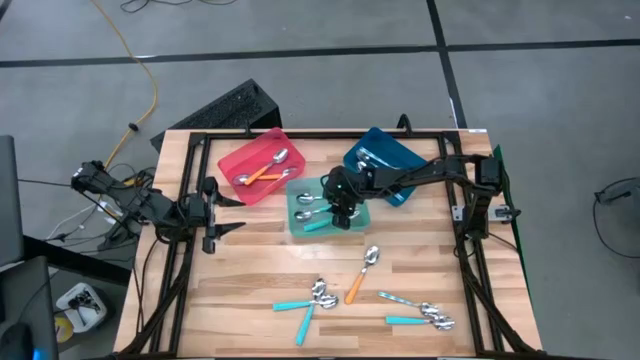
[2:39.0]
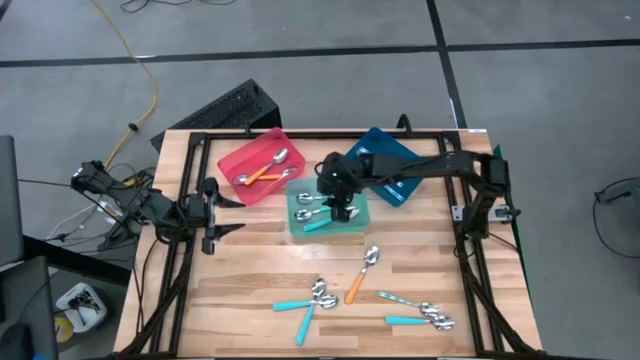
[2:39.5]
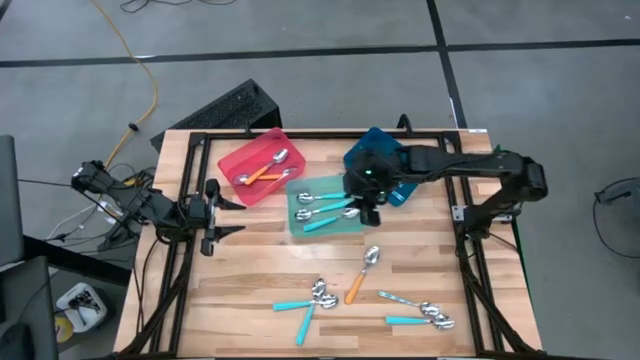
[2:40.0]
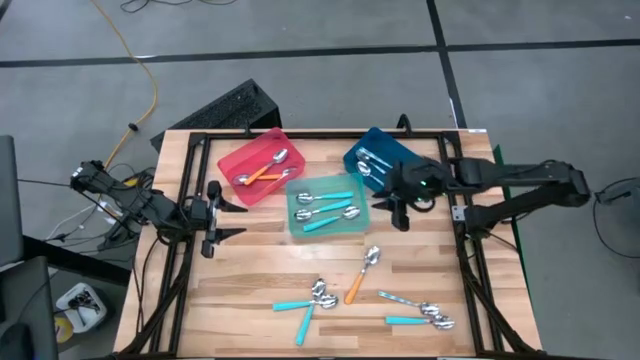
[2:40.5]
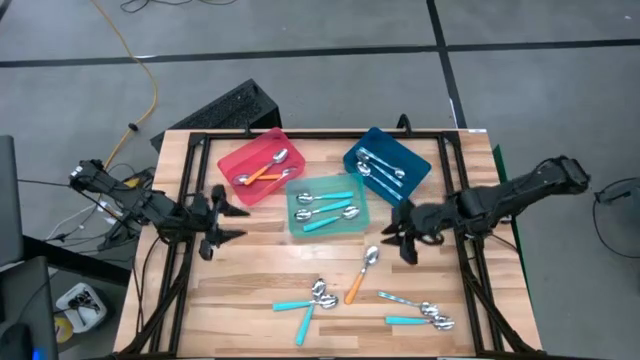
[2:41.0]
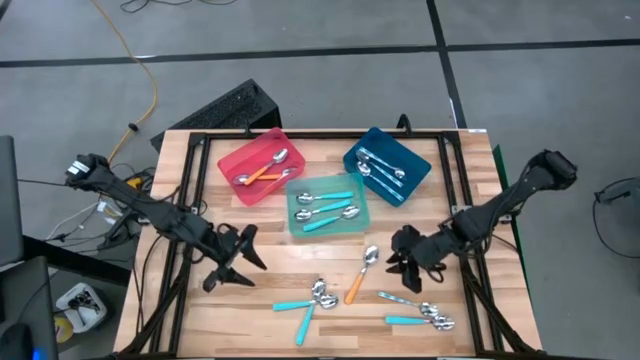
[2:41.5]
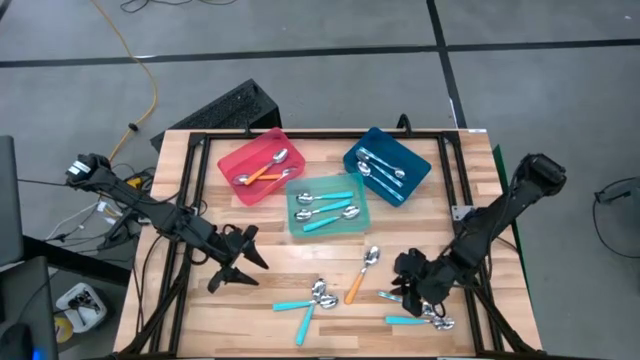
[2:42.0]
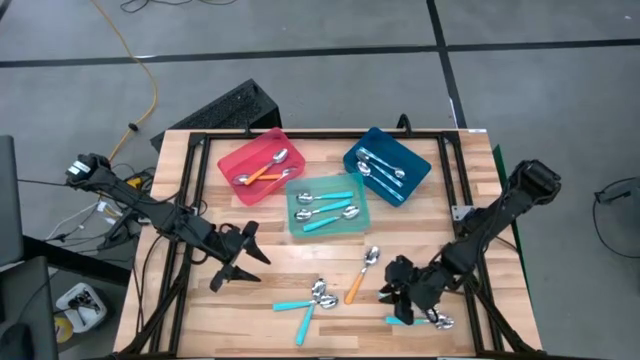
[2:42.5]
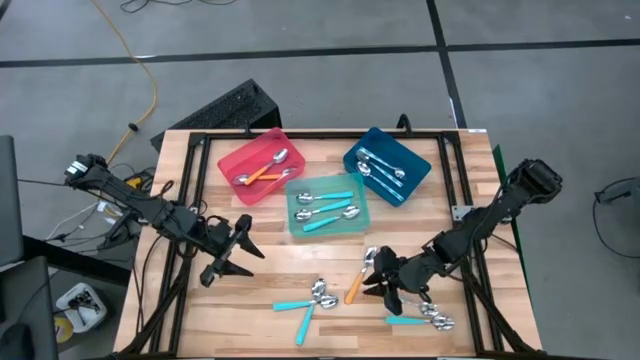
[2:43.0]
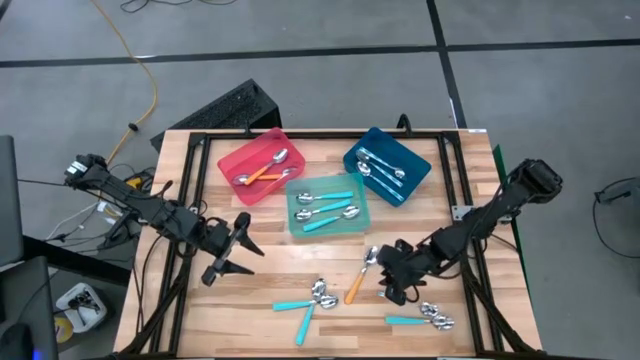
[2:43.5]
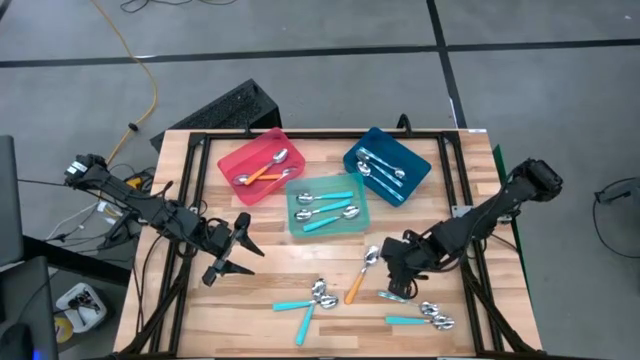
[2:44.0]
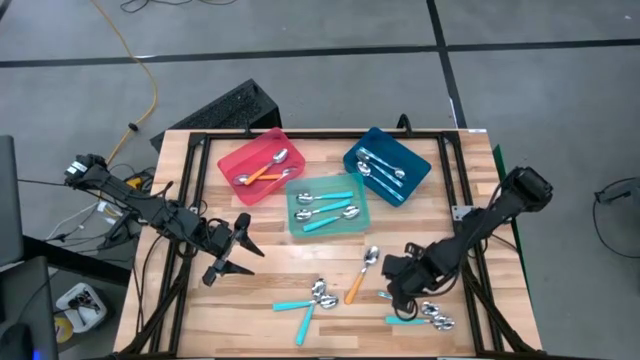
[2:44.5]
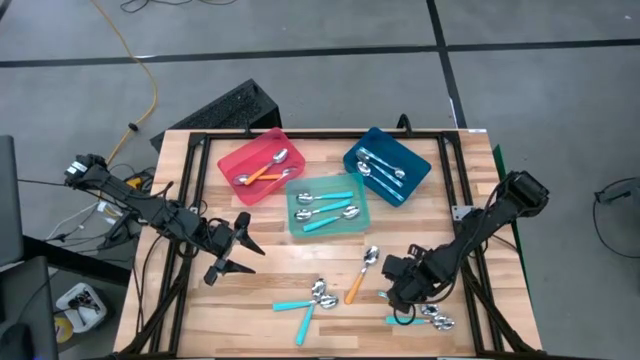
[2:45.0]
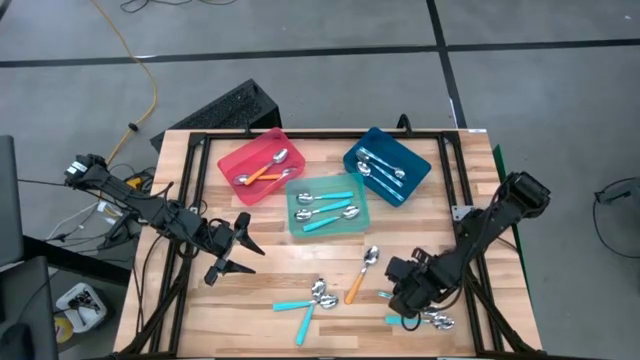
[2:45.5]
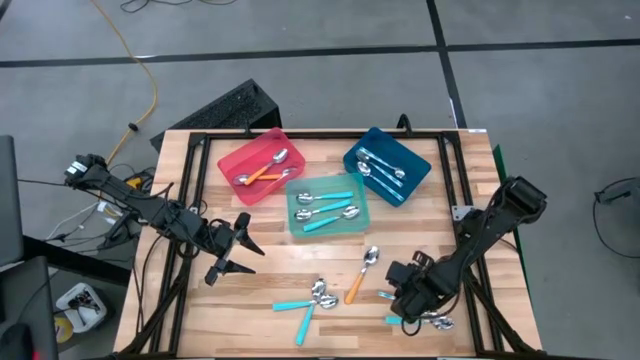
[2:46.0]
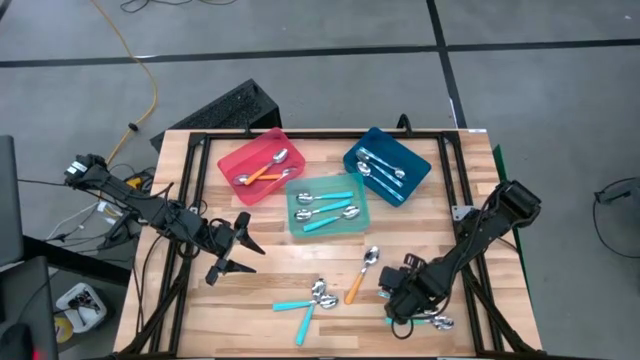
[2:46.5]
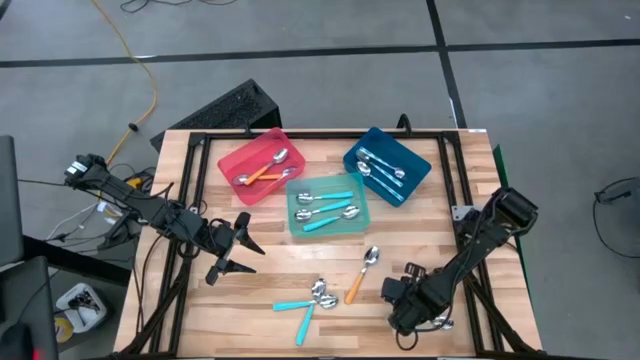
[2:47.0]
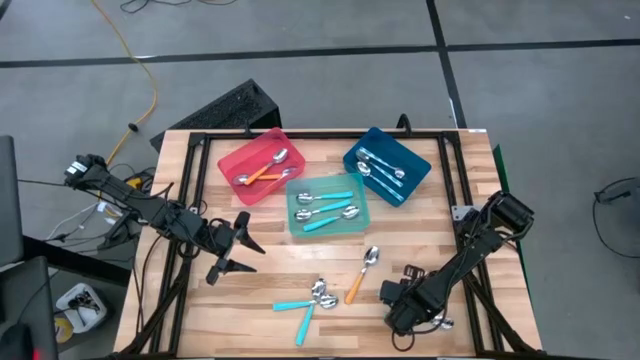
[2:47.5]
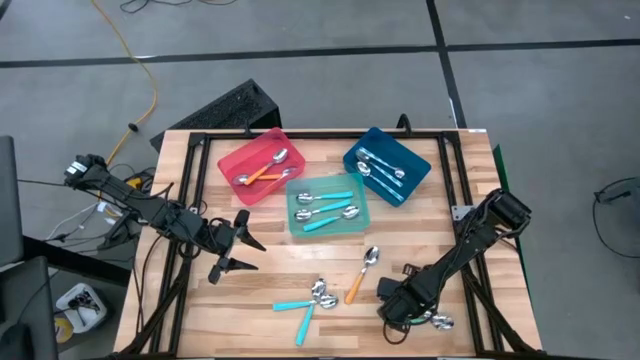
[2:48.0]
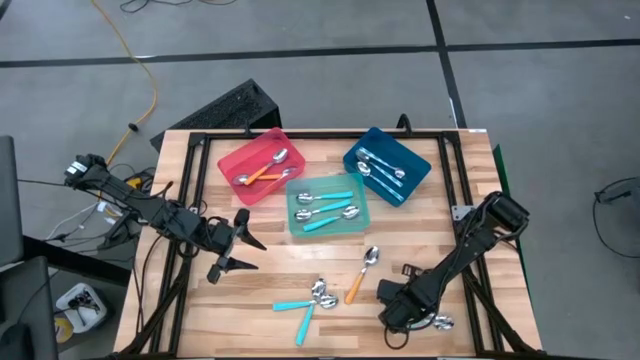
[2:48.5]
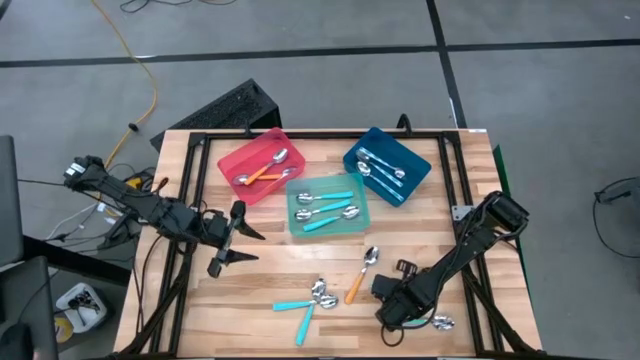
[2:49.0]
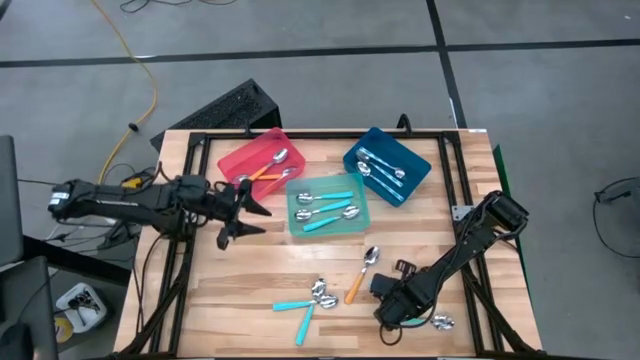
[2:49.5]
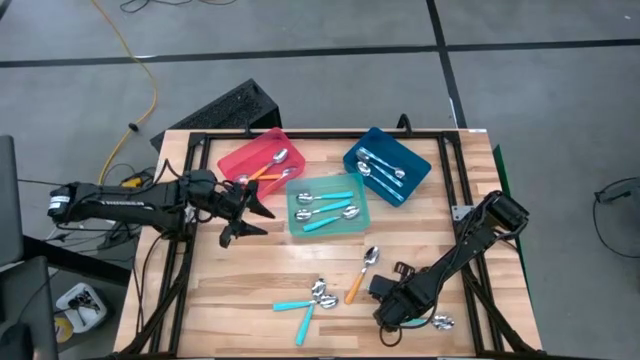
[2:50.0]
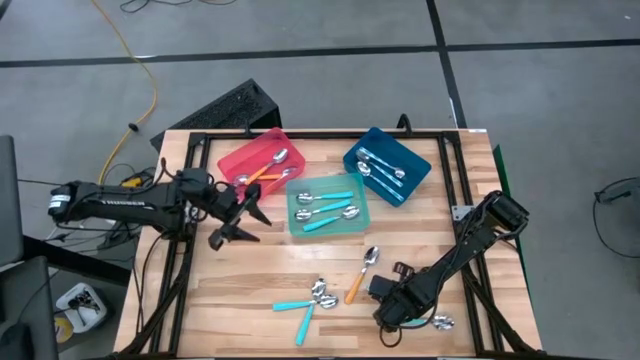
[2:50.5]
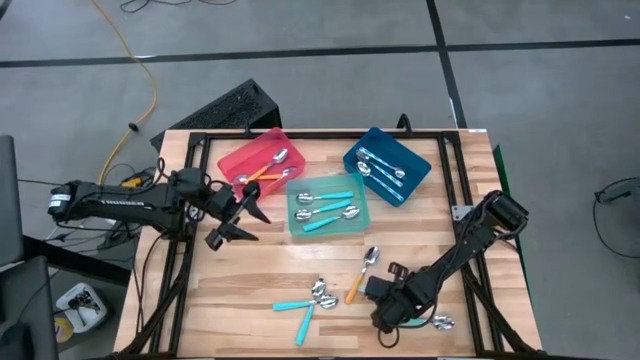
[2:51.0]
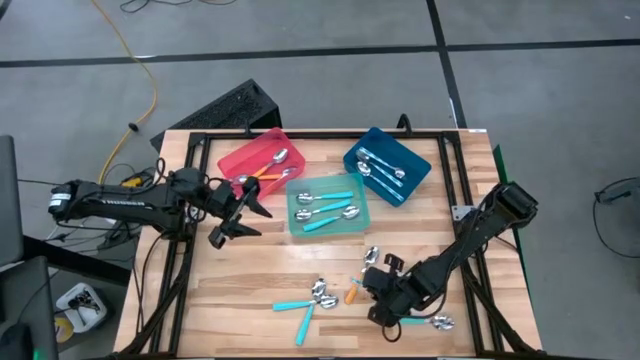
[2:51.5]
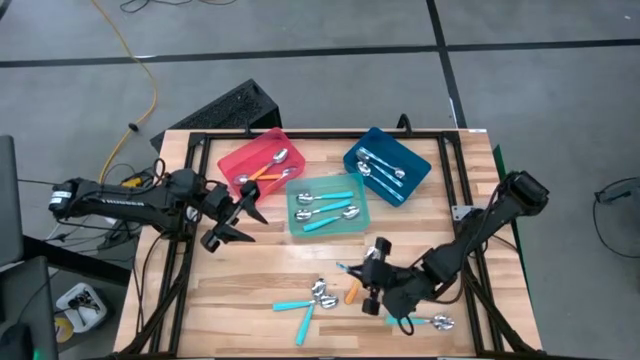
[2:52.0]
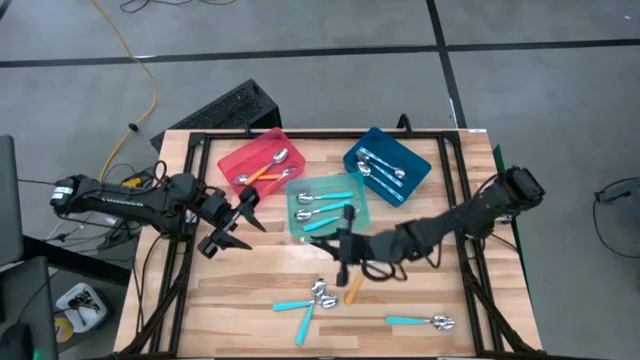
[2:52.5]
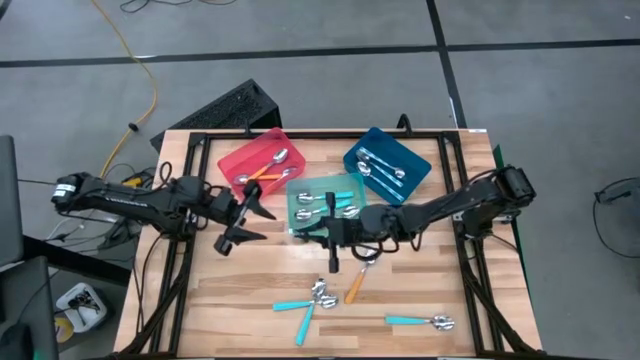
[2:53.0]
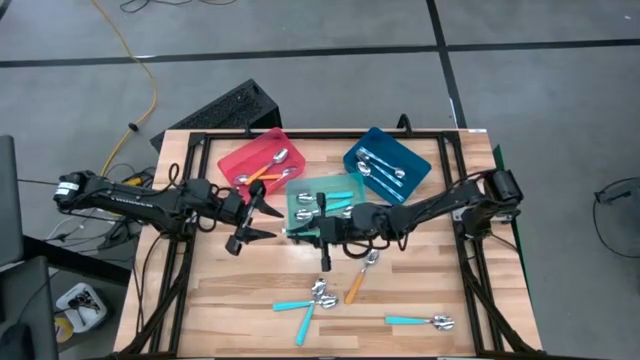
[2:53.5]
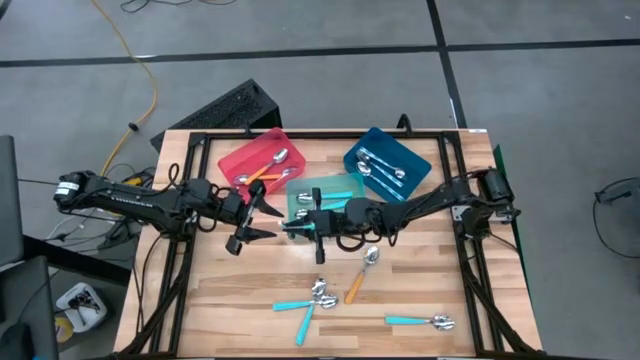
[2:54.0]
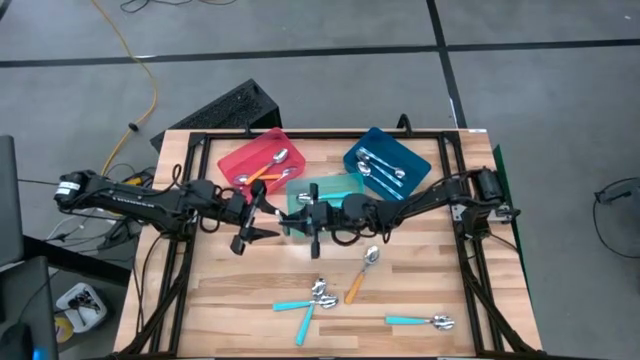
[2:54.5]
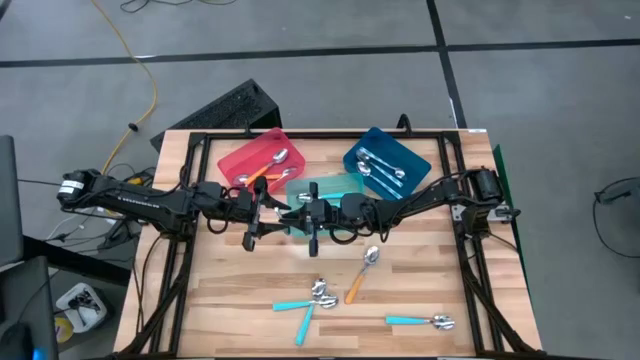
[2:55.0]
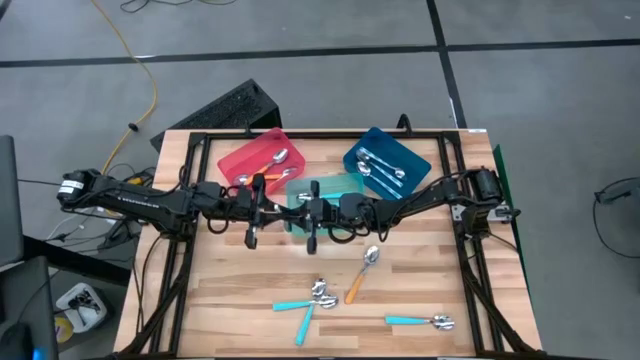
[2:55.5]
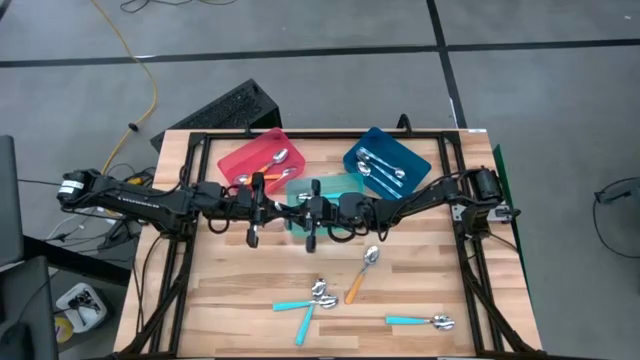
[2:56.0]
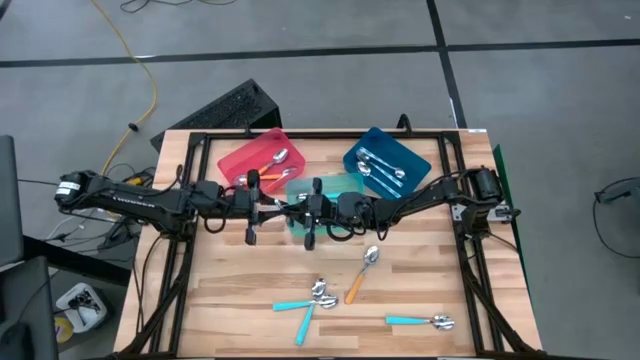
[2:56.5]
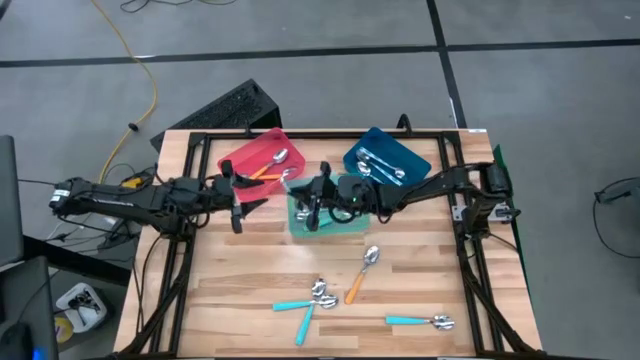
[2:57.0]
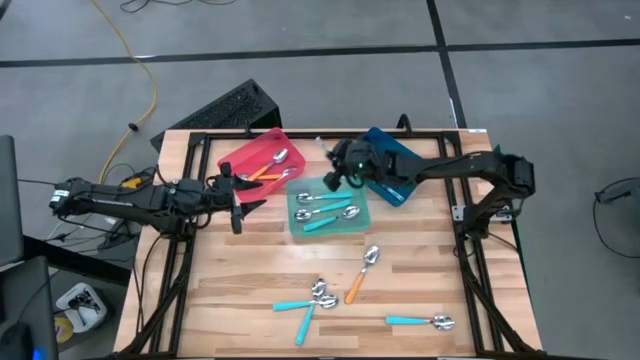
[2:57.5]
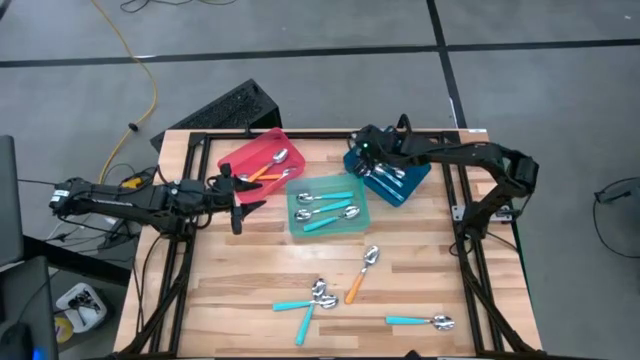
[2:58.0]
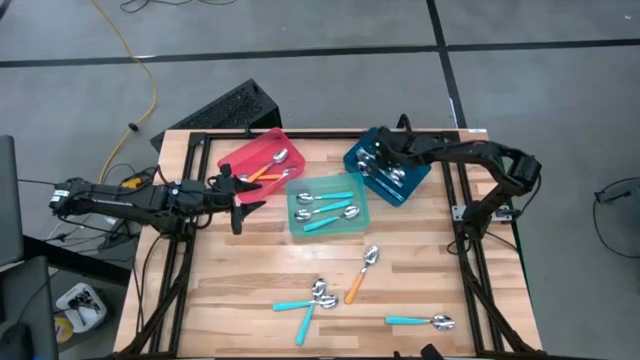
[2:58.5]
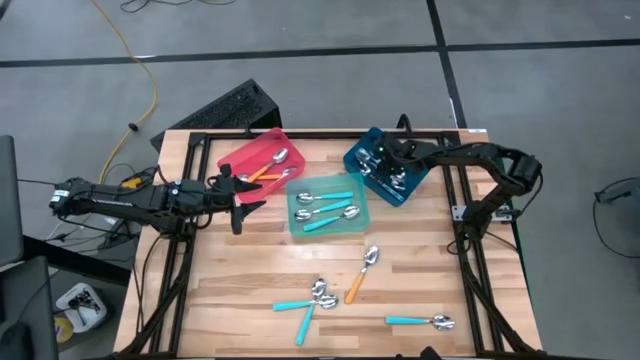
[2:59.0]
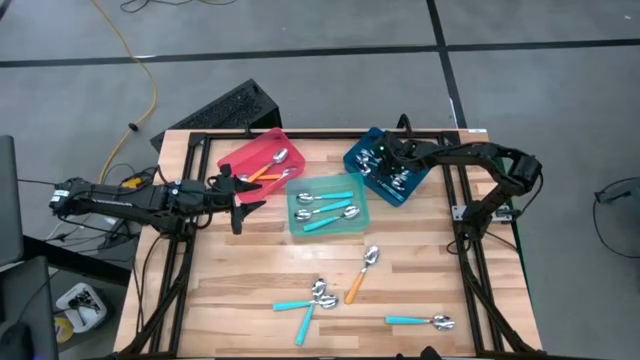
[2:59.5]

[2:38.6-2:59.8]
Task: Sort silverware by color (type)
Put the patterned blue spoon into the blue bin
